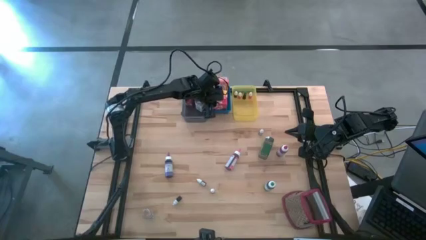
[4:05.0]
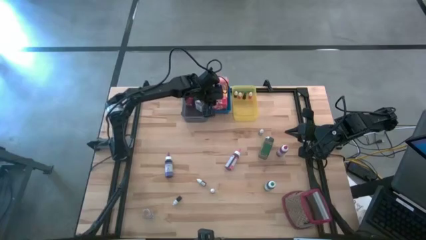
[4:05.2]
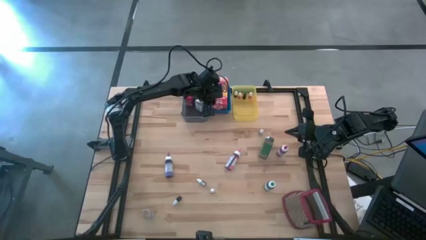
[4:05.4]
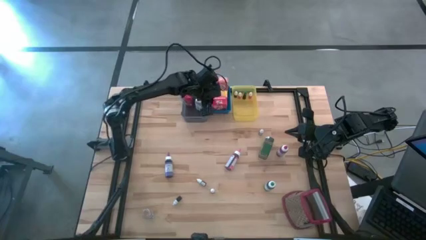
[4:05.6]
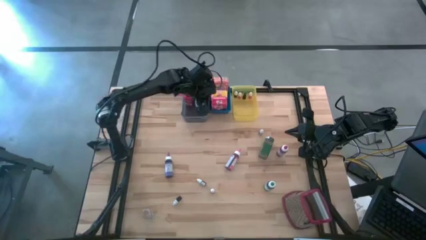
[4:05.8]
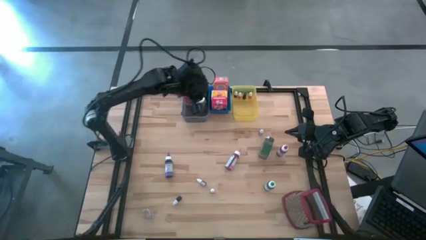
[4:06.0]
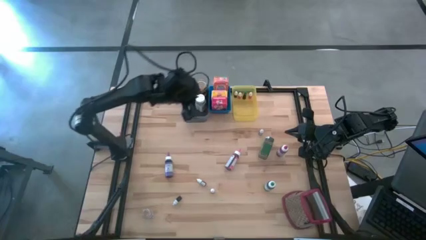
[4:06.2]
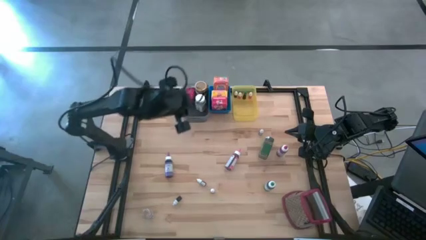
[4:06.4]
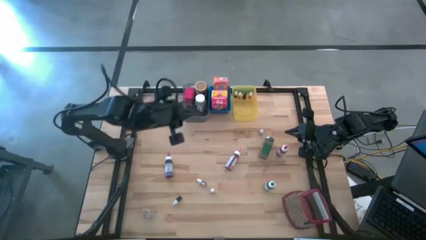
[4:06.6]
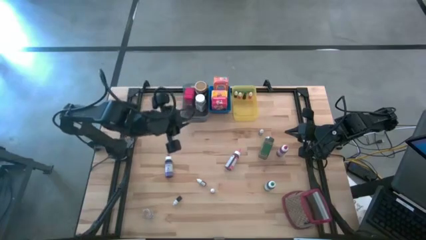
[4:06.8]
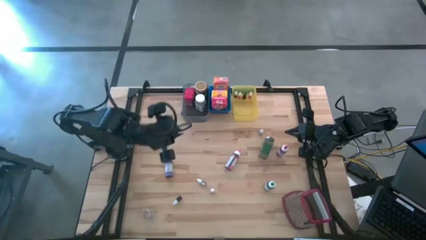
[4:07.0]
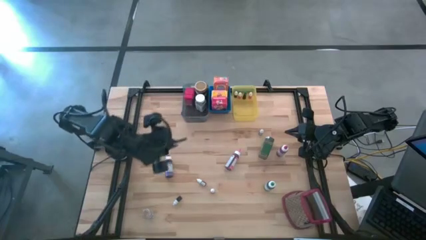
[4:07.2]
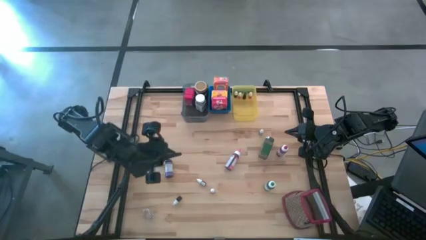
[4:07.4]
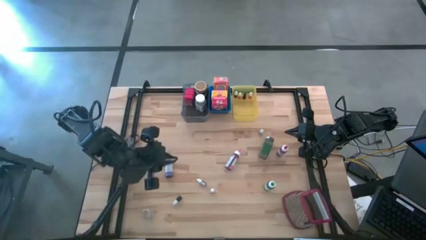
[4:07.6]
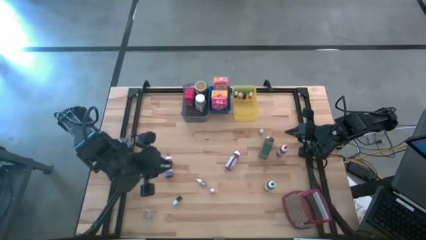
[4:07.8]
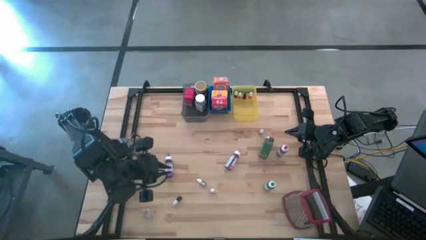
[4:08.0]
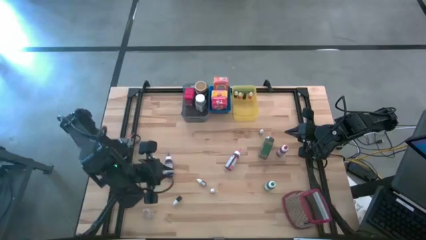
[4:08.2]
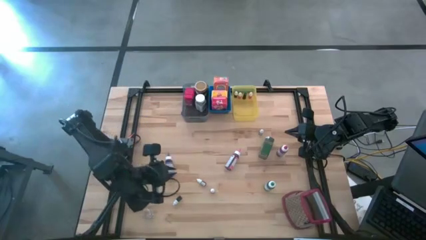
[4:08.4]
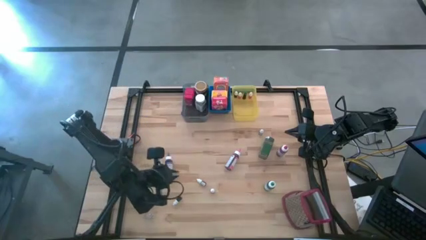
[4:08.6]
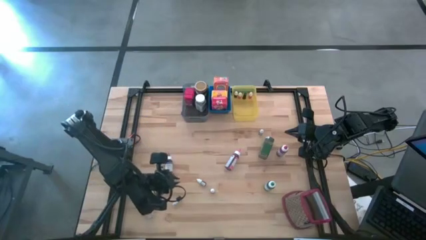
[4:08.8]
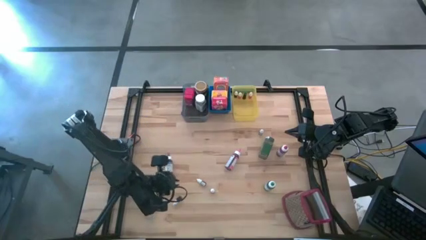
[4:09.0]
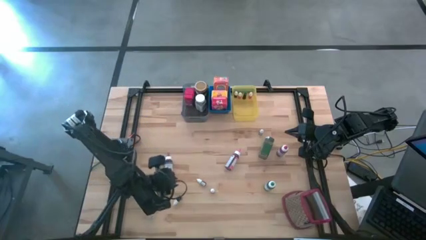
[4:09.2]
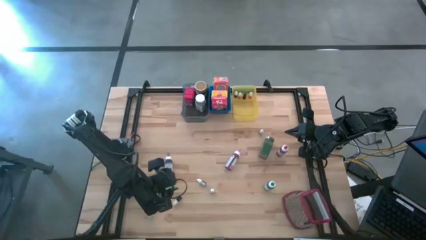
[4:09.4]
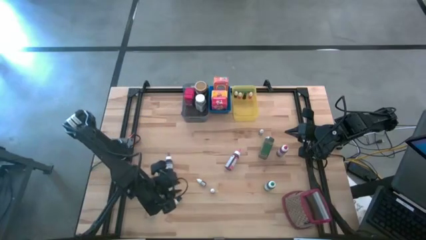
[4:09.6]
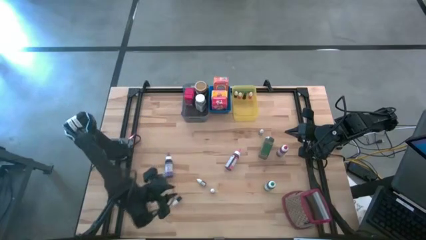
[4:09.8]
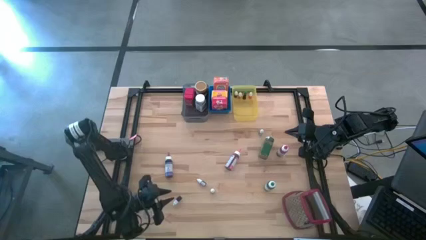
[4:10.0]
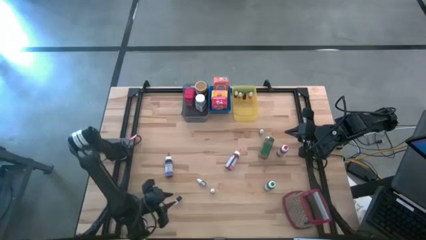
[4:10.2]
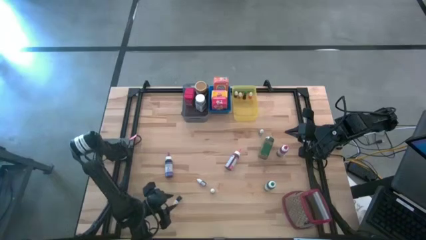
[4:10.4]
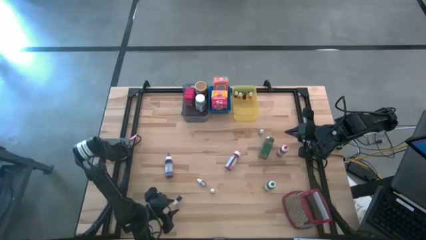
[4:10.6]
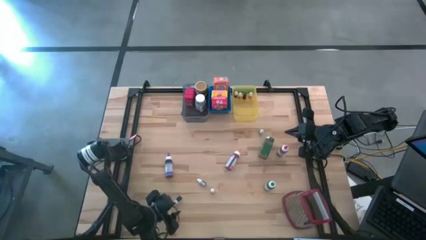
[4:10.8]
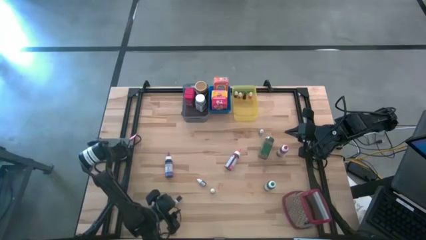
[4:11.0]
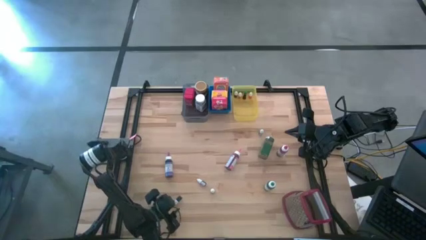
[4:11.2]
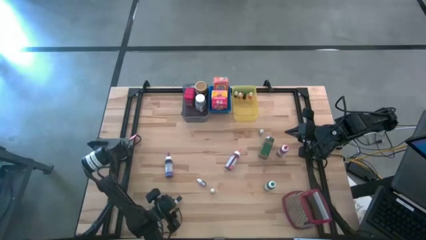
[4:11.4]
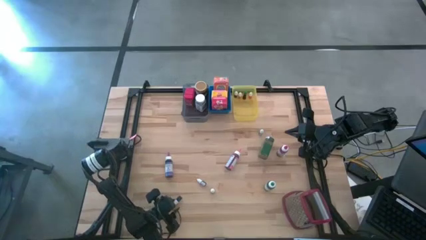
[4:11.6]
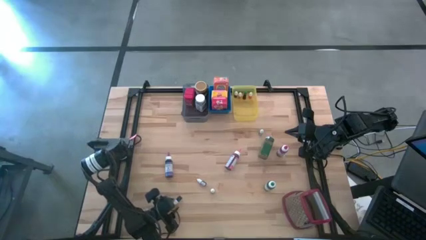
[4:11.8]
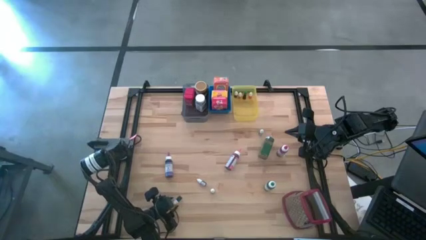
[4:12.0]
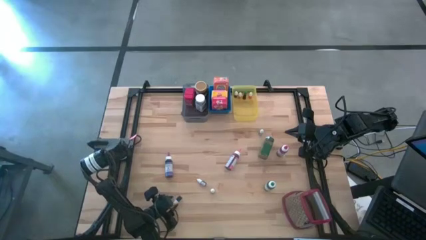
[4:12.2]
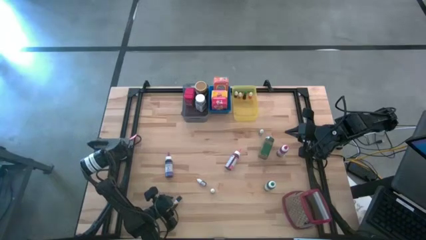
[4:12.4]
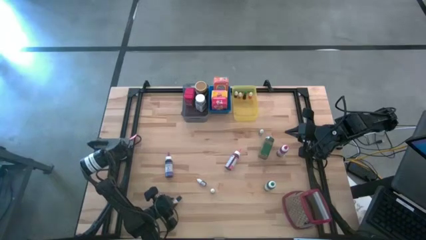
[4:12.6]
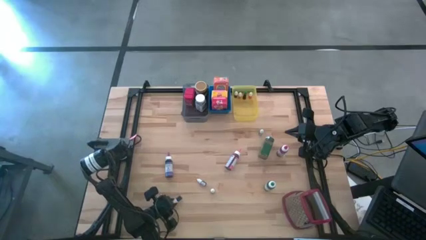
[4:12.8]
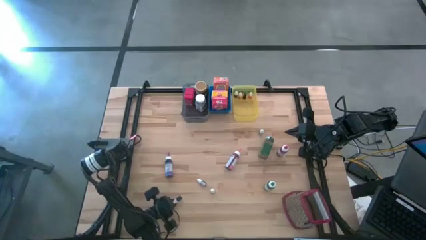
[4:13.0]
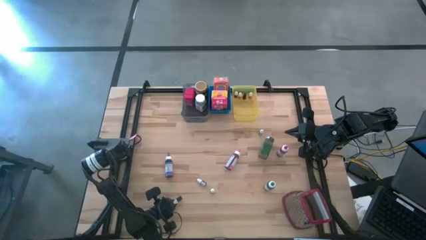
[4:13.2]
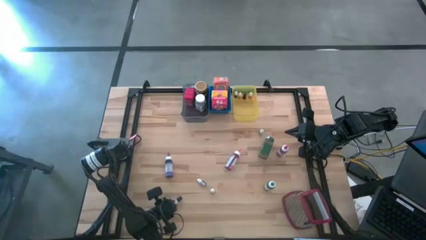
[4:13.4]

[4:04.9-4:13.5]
Task: Pick & Place Kitchen Items
Move the black food coloring bottle to the center of the table

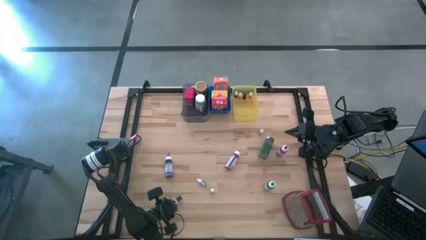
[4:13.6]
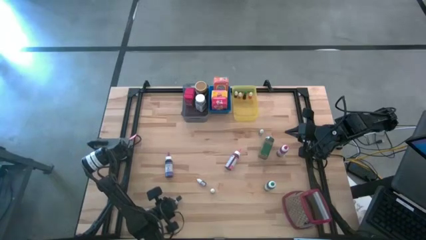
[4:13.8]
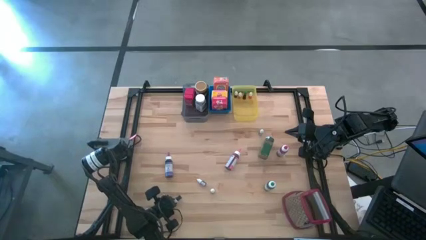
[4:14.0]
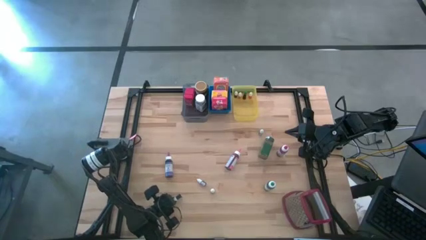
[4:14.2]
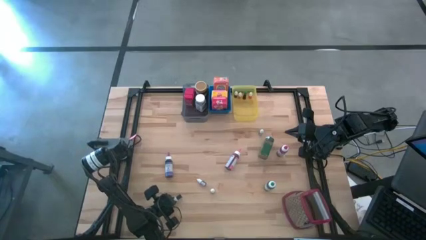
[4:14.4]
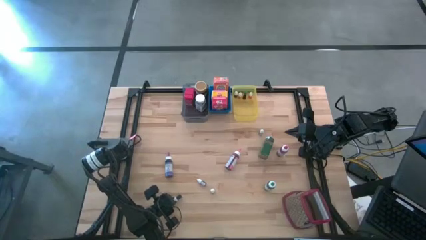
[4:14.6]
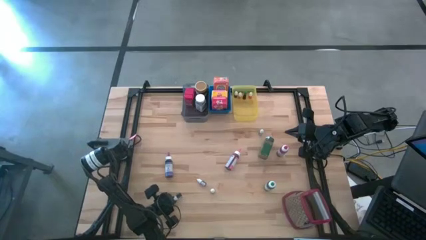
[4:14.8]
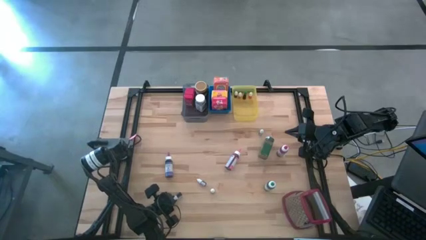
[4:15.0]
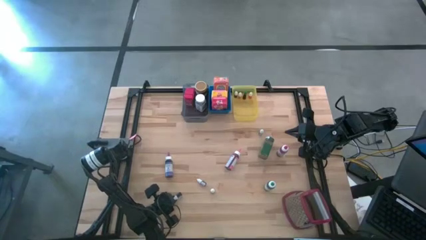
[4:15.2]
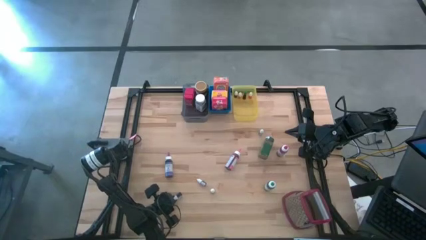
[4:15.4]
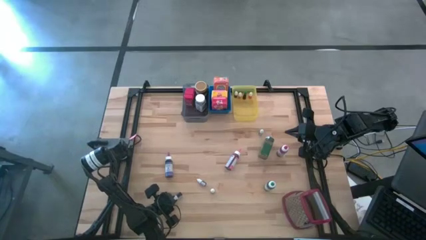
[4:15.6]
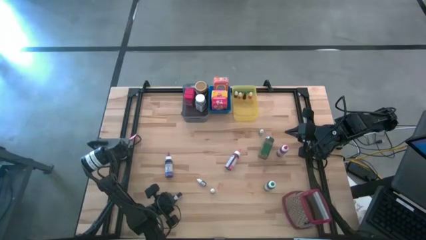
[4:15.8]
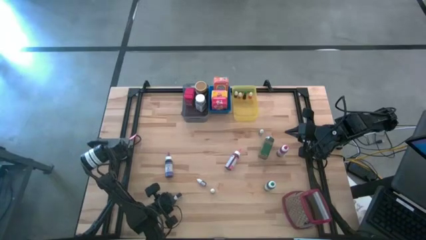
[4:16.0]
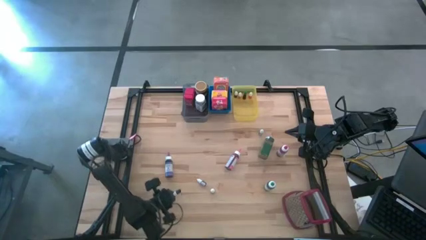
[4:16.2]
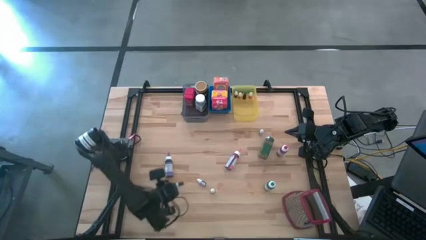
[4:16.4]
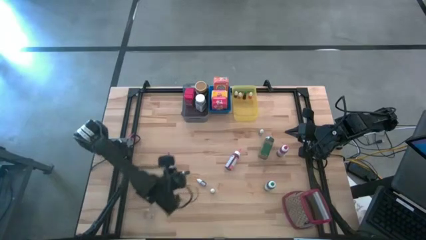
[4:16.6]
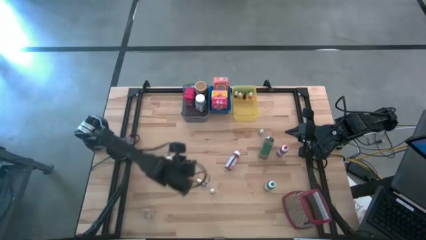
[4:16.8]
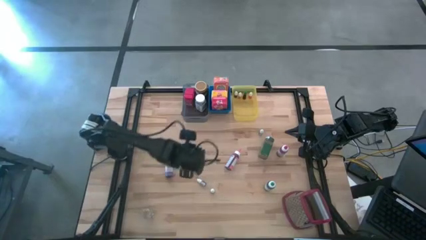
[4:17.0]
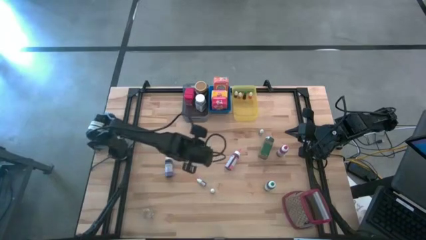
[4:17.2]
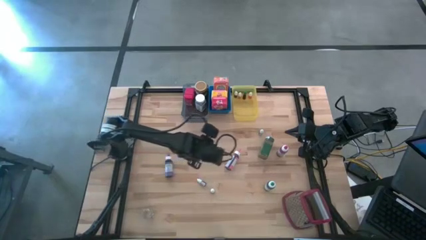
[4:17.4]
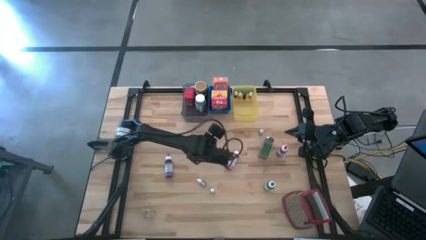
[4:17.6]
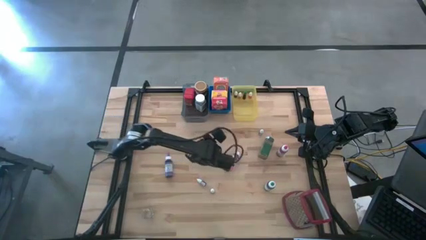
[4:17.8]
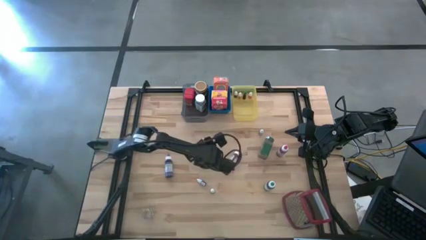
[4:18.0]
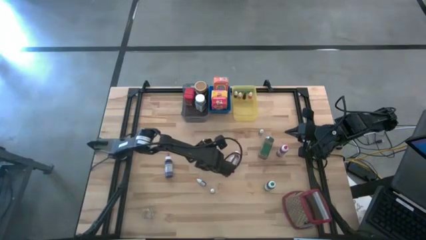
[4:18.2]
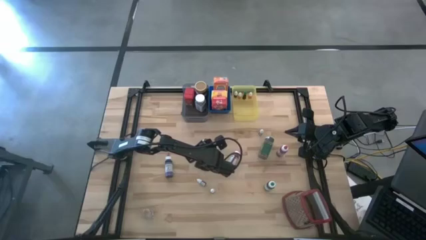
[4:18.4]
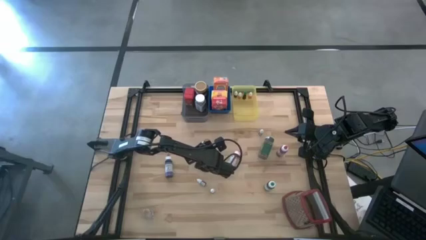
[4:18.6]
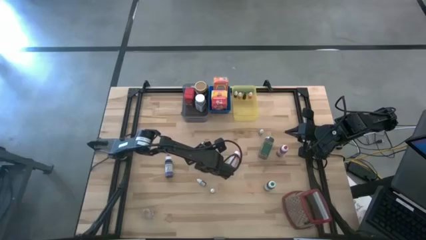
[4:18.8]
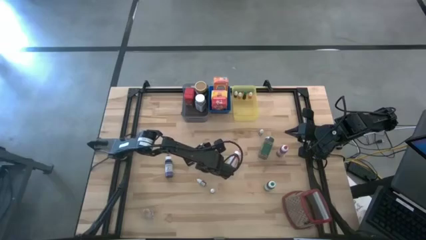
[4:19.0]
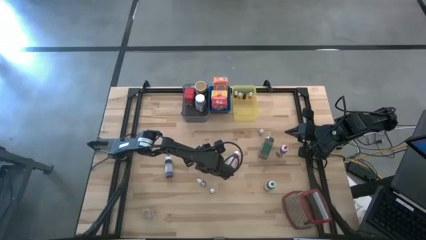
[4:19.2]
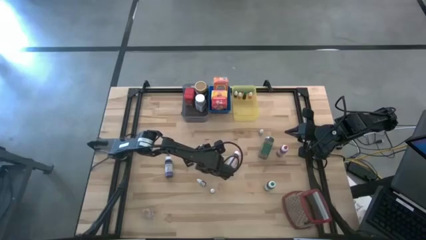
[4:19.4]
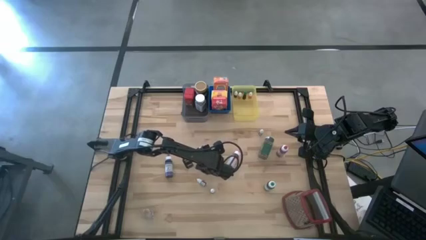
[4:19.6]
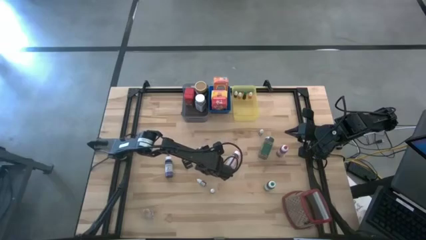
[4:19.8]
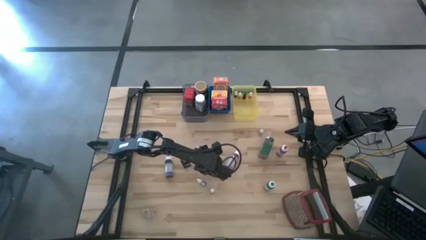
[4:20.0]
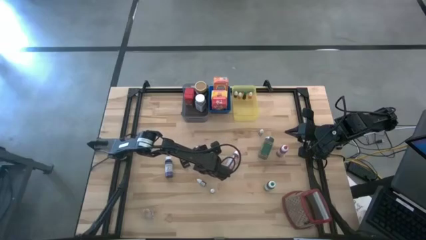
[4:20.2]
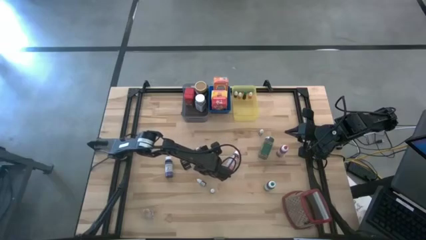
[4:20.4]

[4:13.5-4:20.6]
Move the black food coloring bottle to the center of the table
